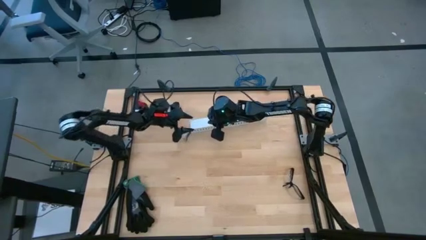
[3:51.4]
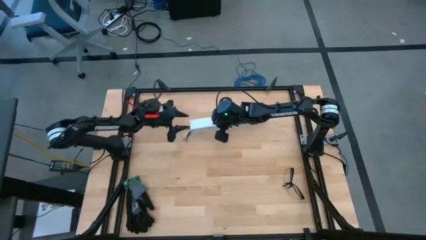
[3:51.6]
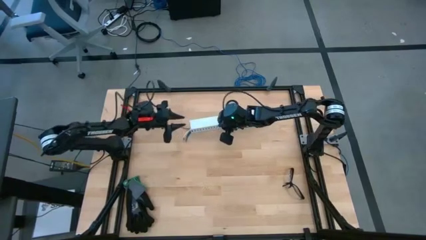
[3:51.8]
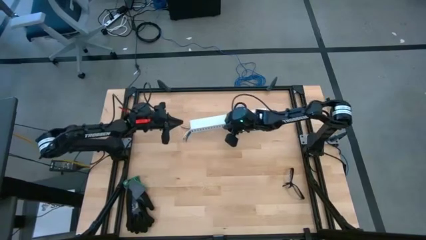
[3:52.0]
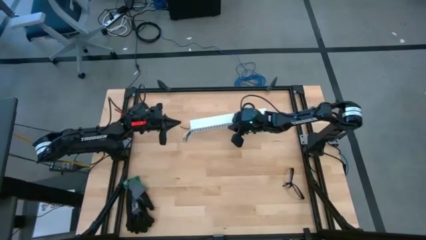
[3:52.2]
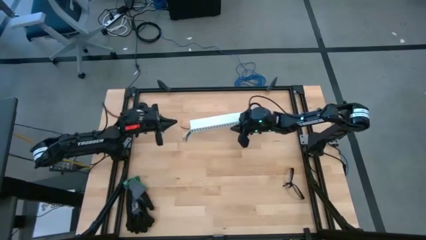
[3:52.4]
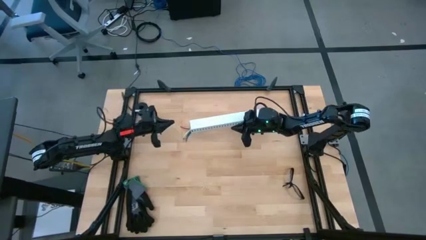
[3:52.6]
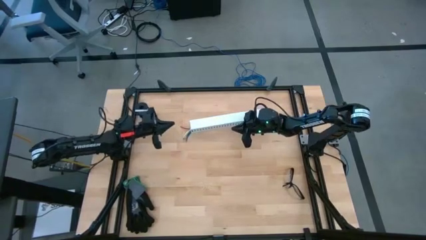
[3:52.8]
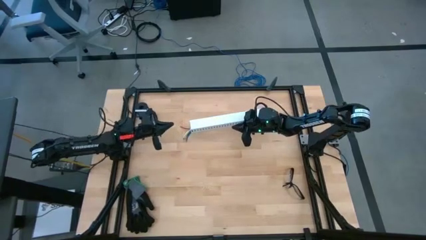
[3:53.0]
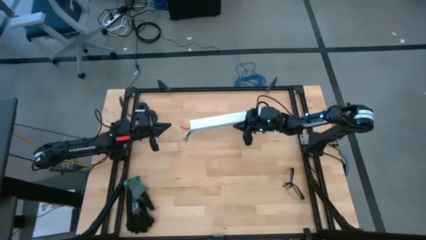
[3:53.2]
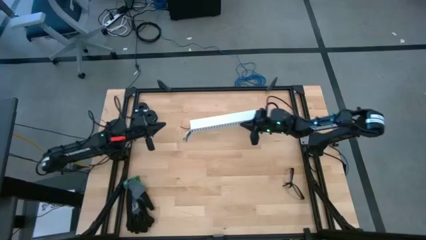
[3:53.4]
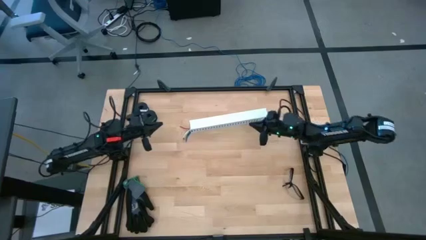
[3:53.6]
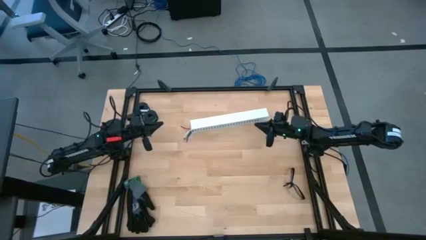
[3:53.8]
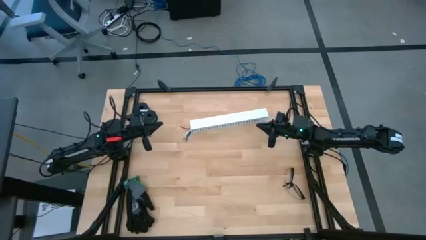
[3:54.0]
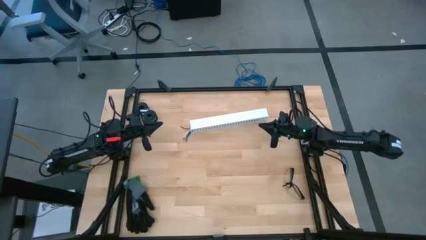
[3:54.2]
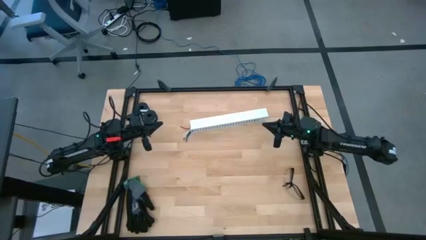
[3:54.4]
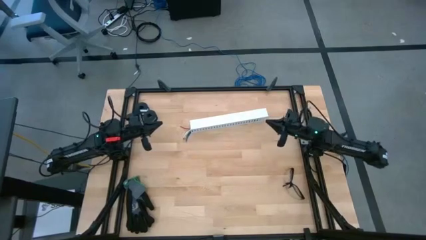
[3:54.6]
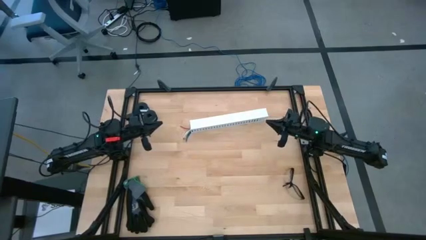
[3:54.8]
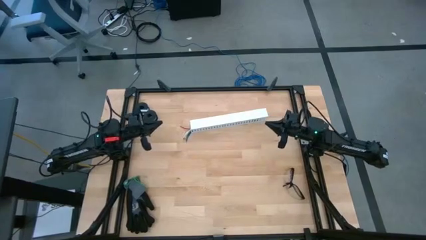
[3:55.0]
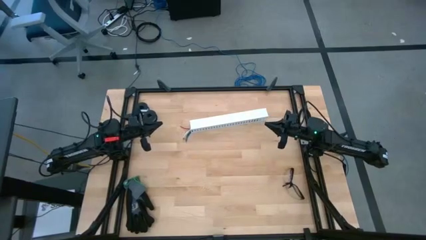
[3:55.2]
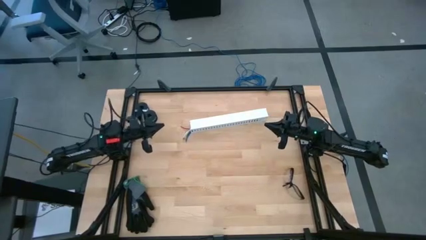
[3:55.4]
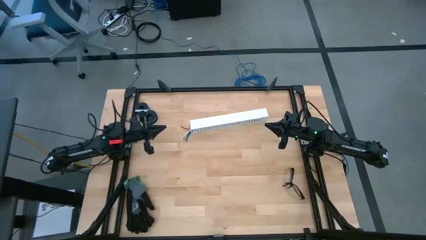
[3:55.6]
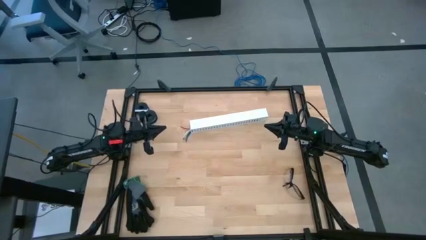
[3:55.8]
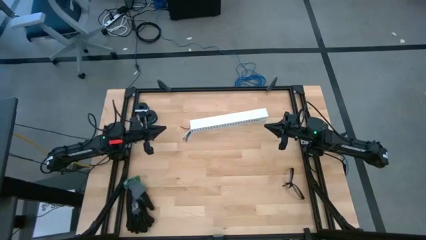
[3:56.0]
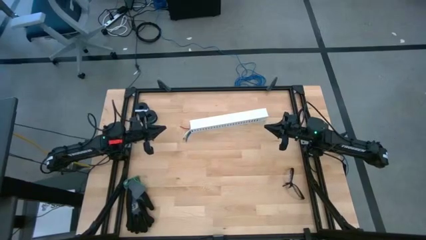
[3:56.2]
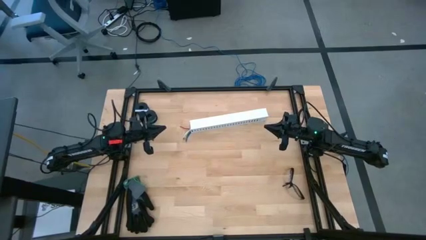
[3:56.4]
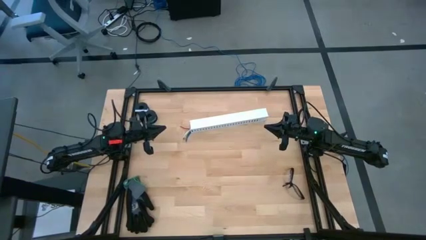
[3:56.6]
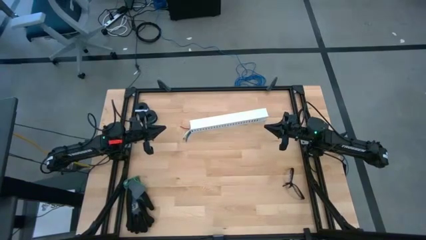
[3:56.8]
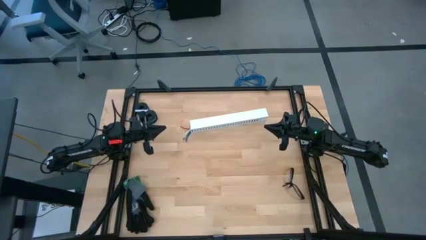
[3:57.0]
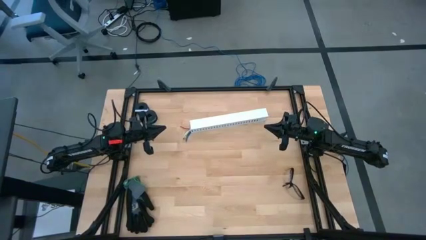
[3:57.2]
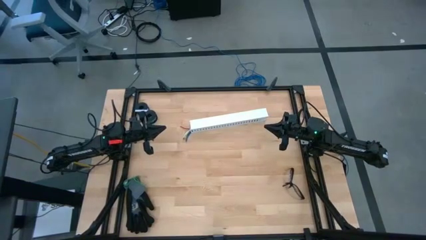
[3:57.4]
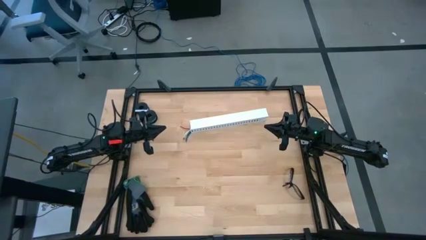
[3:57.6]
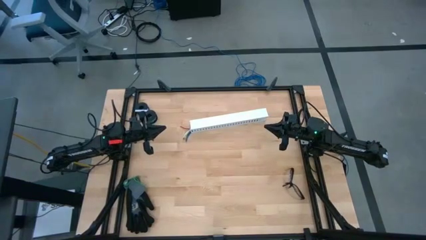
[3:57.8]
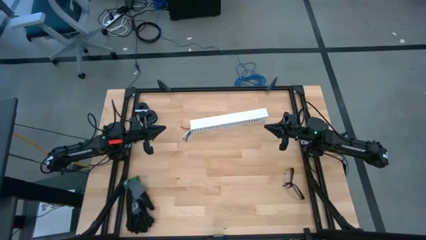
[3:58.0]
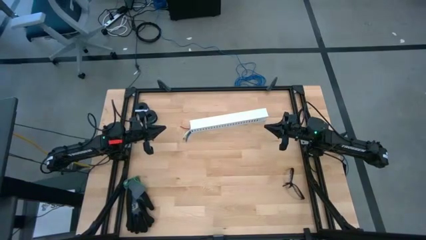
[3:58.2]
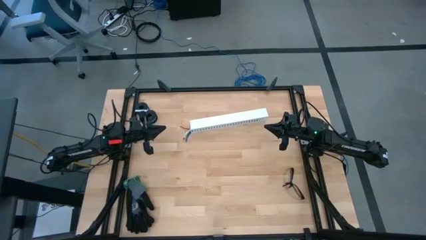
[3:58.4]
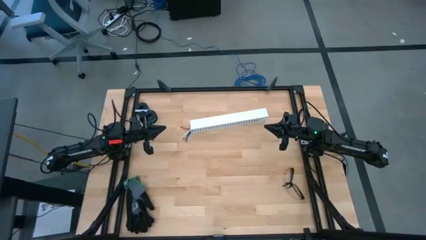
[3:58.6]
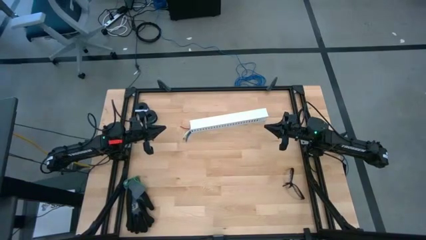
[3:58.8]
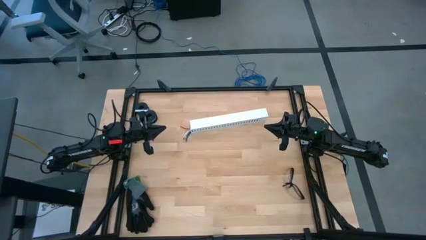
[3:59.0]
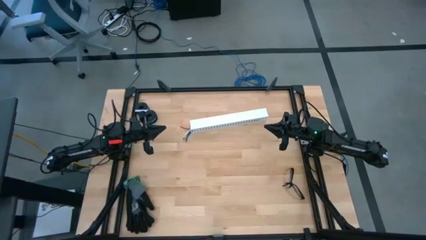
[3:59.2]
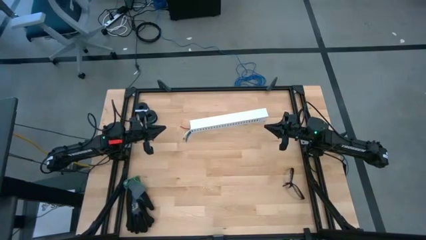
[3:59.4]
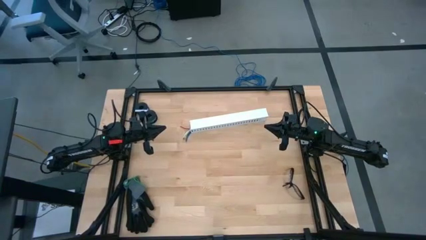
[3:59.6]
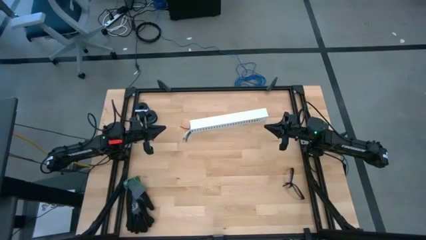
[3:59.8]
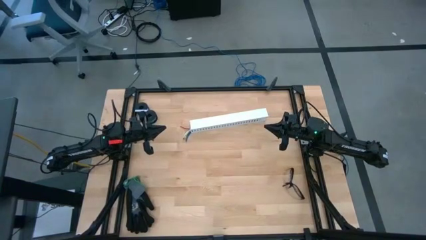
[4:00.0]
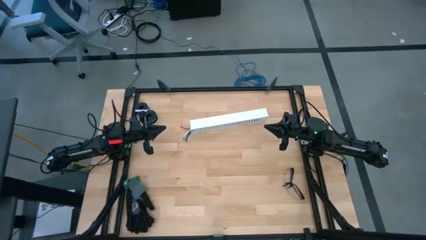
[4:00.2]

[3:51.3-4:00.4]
Task: Ziptie cables
Return to Home Position

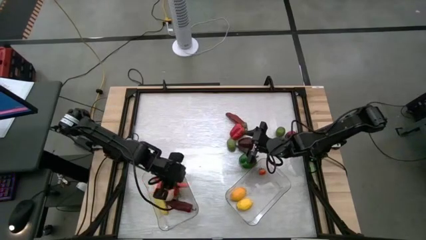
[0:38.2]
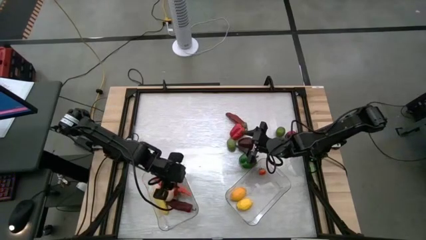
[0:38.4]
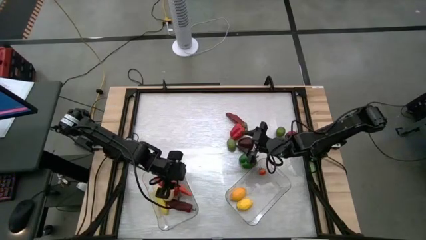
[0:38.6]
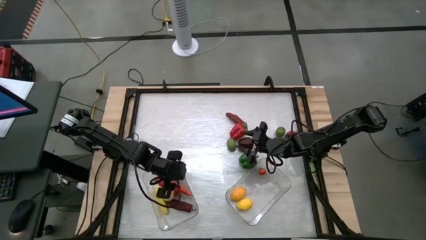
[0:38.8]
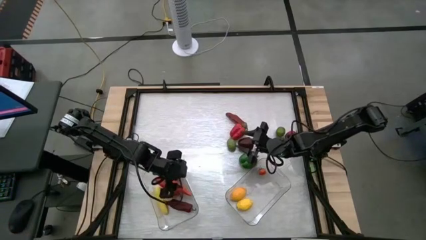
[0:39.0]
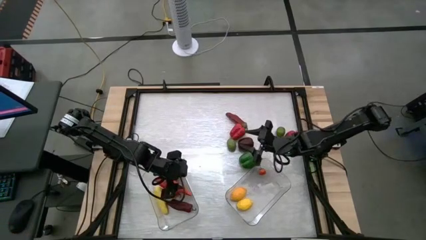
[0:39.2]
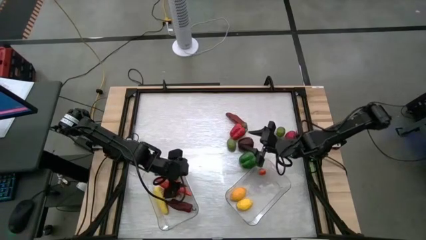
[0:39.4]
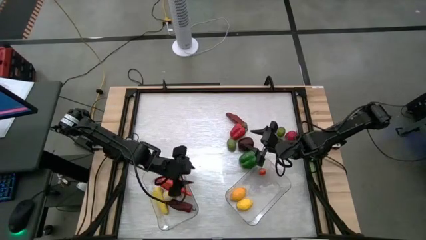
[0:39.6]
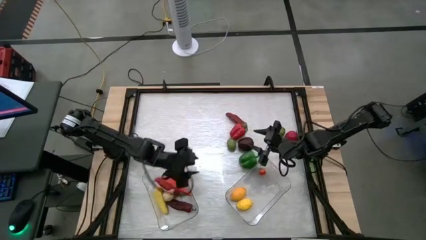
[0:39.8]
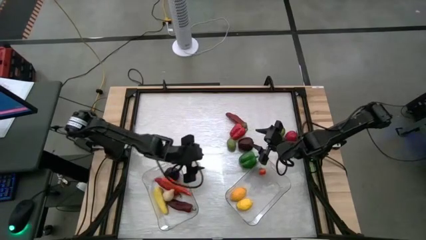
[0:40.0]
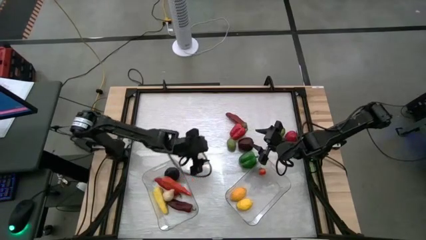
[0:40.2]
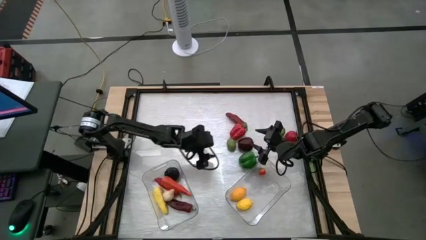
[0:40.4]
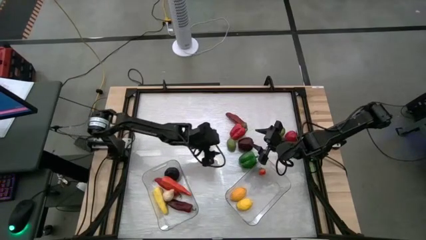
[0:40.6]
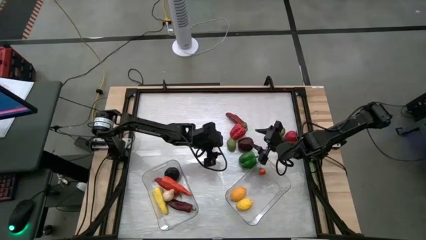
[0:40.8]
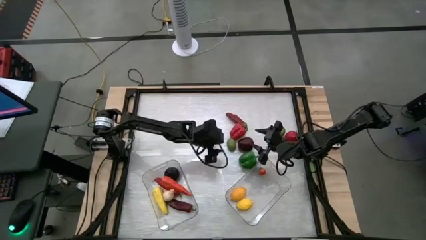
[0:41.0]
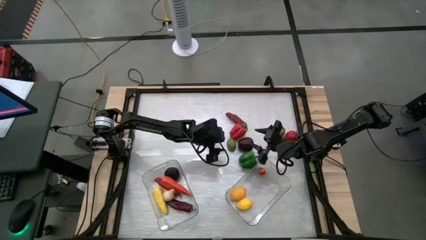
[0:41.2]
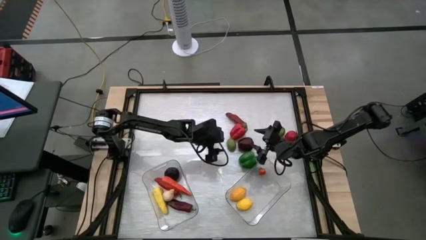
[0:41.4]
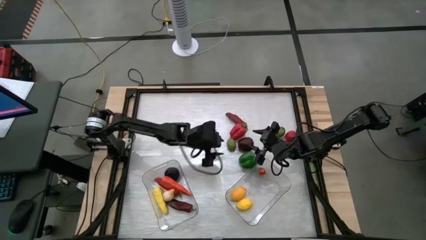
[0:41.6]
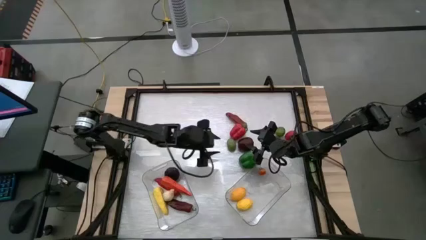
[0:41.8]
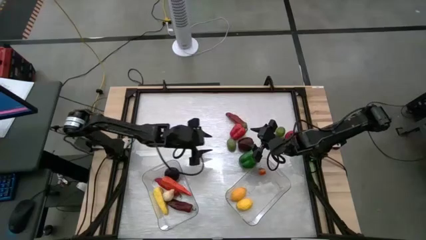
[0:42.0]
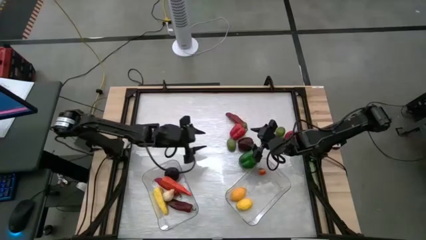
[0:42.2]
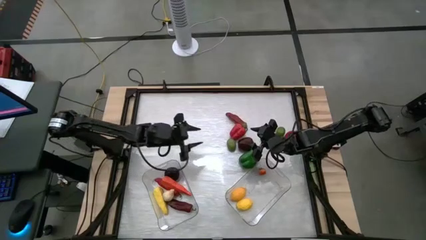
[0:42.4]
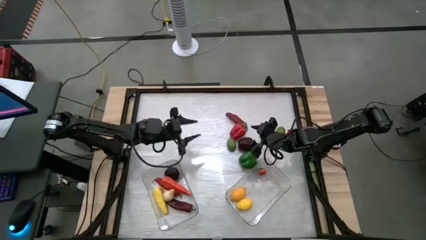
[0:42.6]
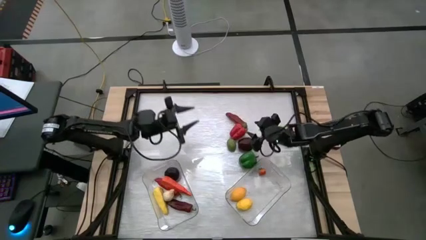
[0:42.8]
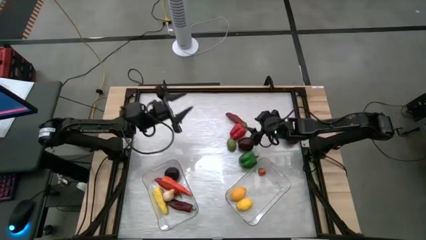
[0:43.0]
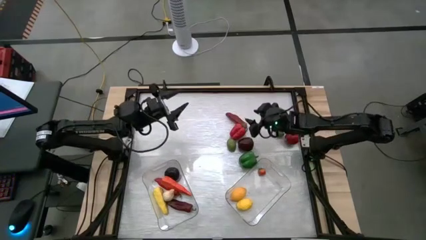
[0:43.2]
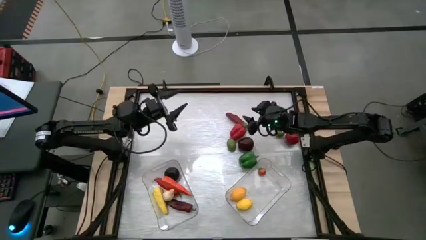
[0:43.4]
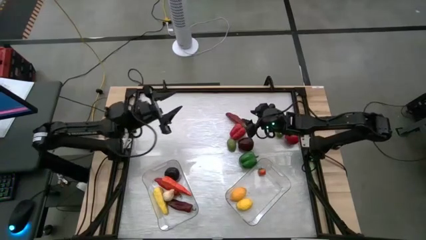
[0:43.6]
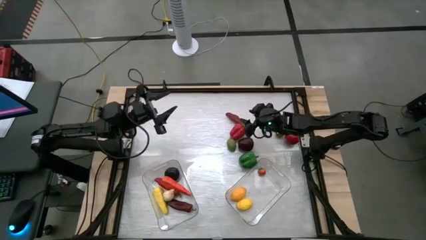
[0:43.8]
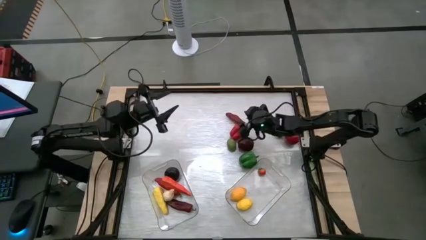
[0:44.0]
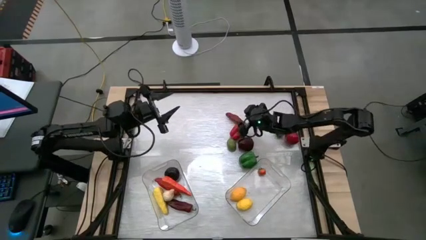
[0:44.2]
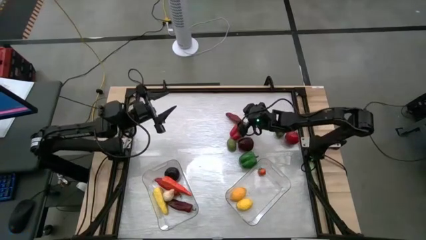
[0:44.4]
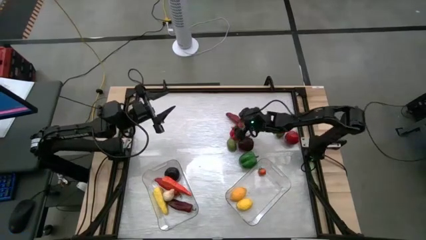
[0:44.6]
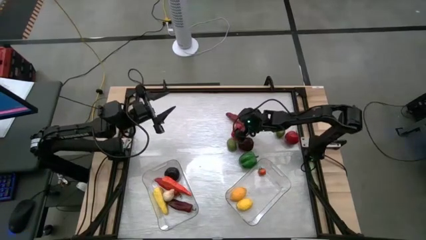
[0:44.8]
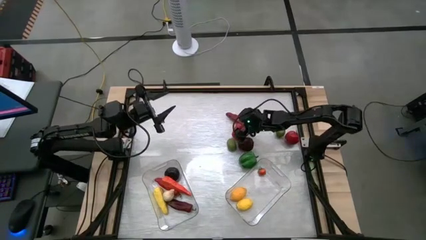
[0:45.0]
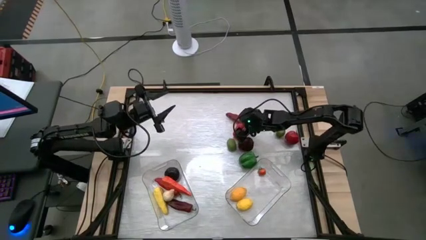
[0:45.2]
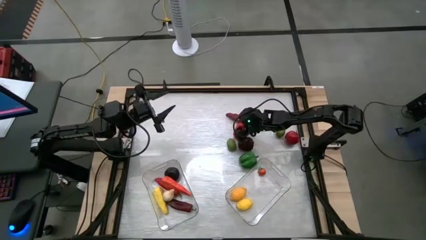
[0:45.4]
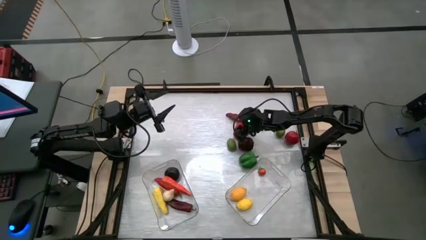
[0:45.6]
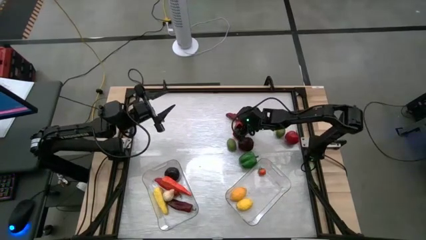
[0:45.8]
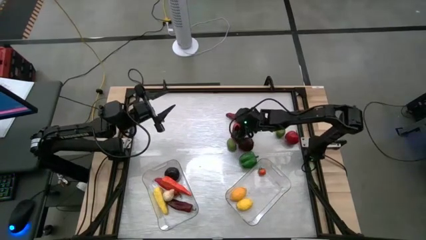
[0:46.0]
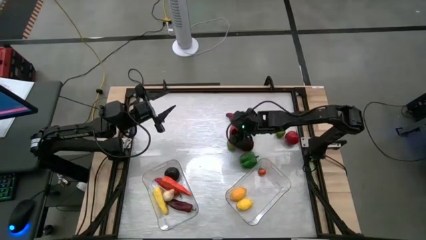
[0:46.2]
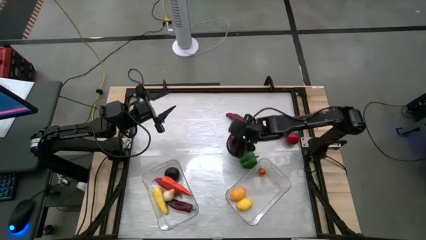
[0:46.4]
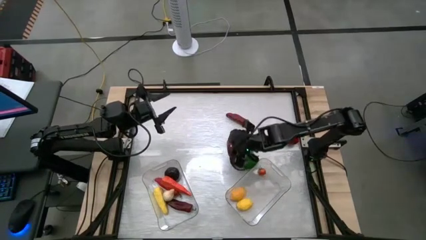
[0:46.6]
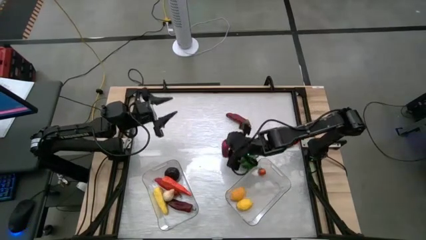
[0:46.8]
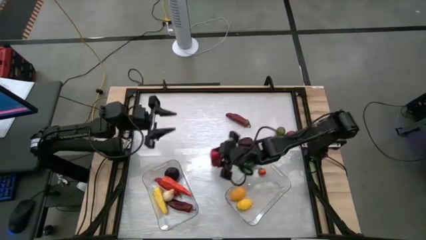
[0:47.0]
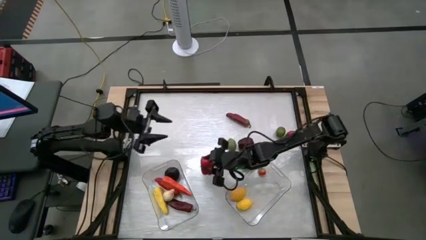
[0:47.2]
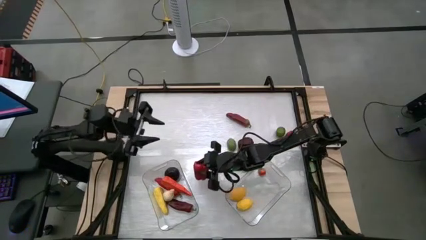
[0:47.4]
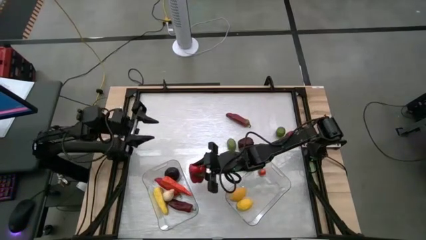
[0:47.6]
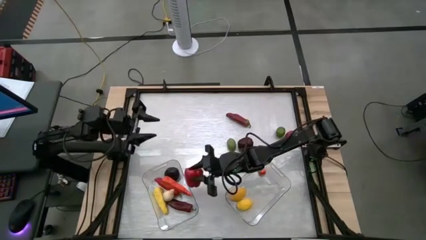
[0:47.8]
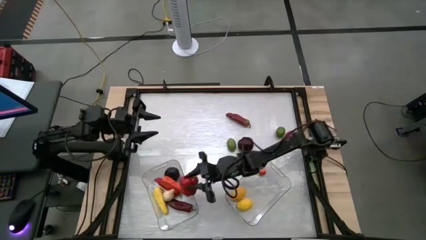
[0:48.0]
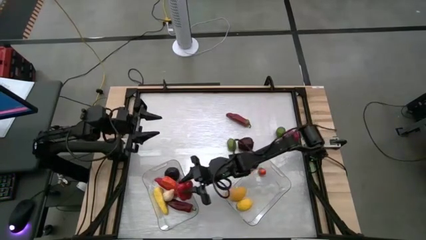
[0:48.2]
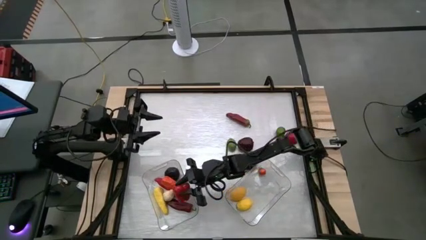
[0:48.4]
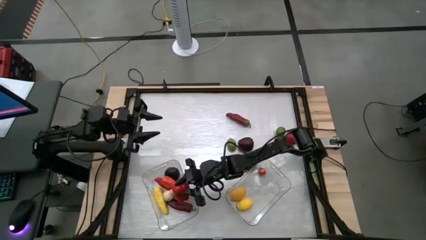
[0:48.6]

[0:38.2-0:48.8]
Task: Sort produce into baskets
Put the red bell pepper into the left transparent bin
